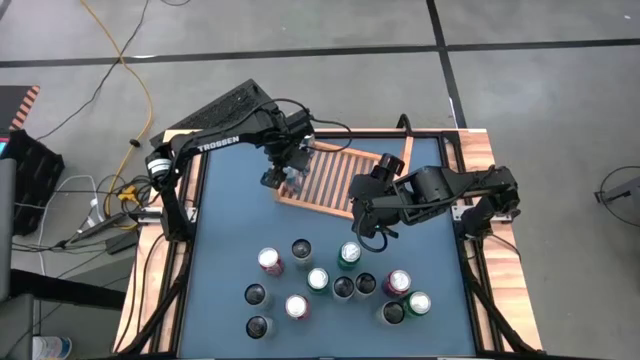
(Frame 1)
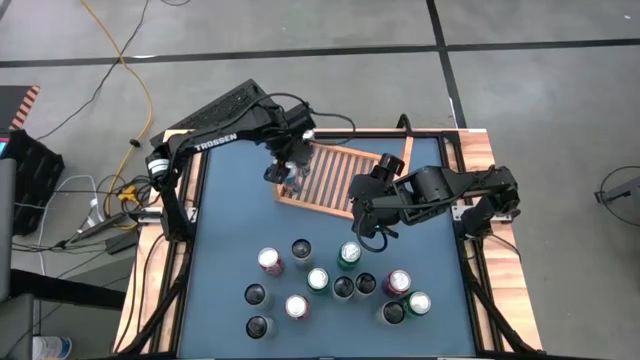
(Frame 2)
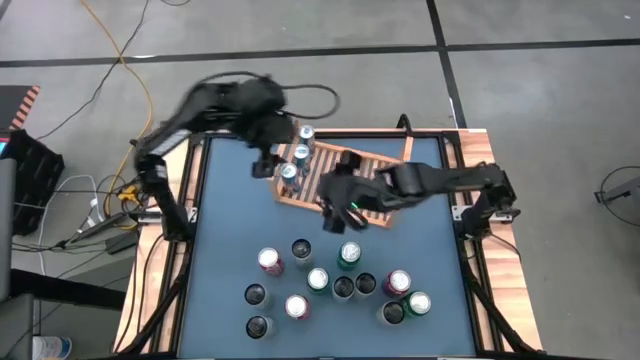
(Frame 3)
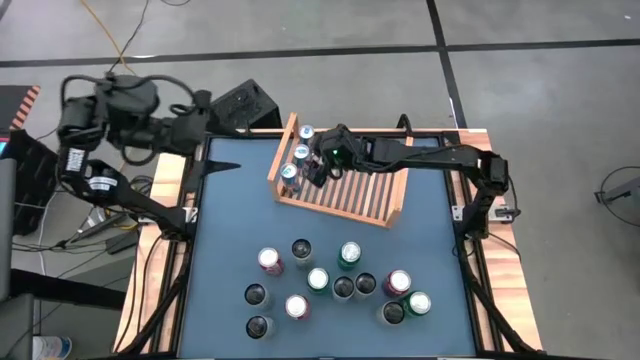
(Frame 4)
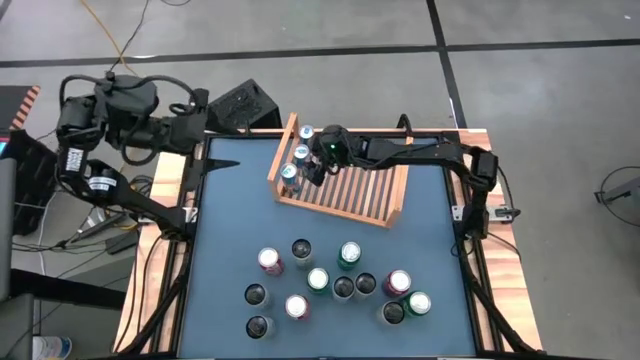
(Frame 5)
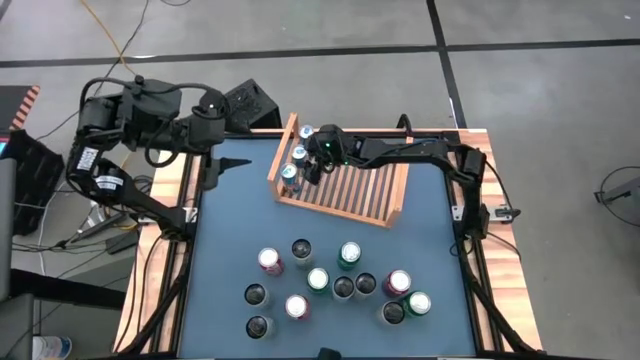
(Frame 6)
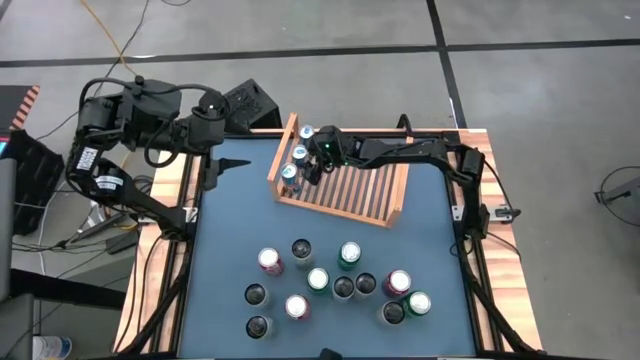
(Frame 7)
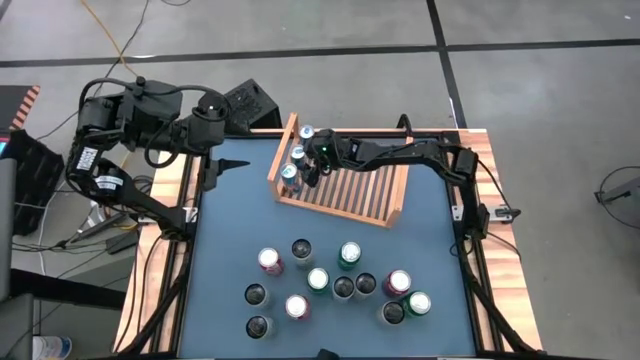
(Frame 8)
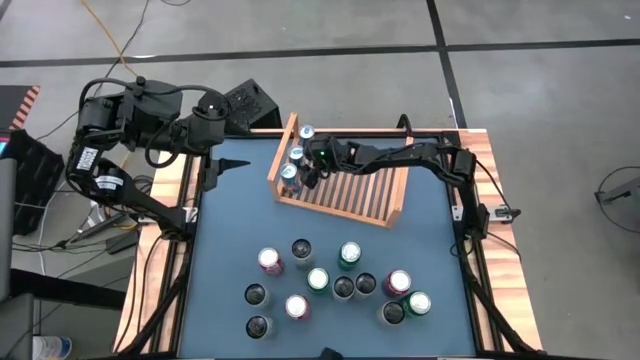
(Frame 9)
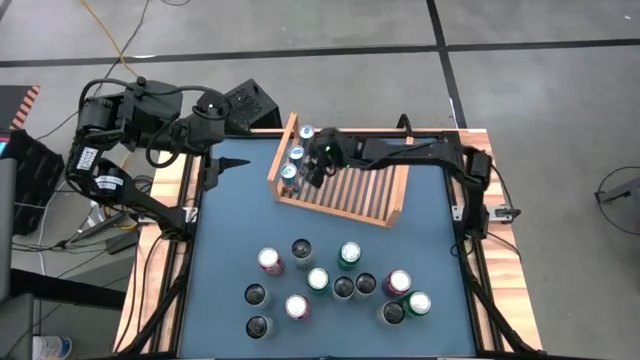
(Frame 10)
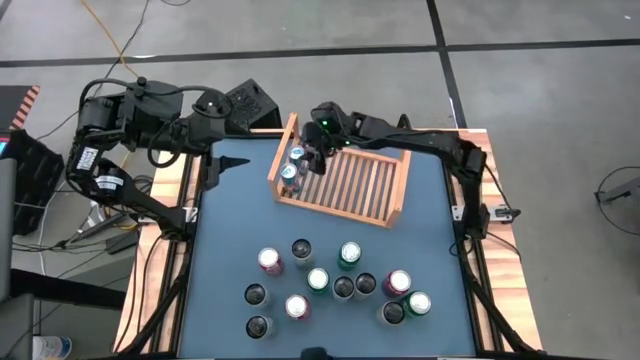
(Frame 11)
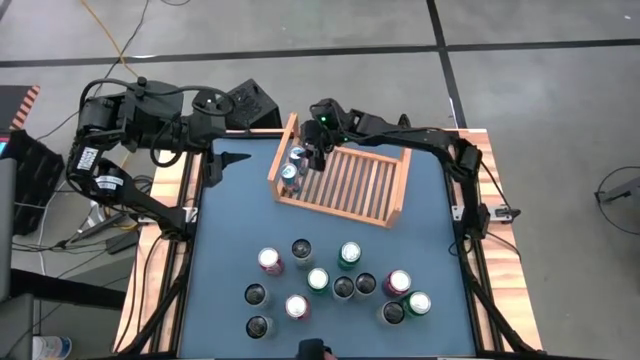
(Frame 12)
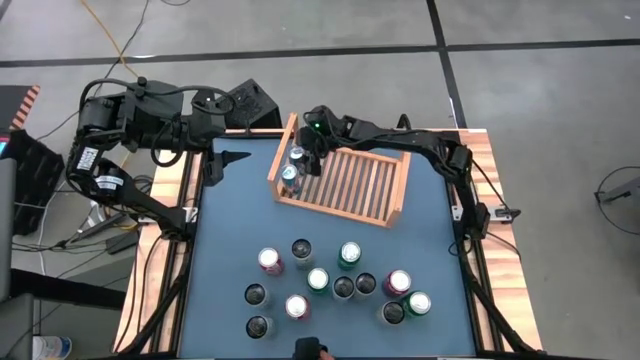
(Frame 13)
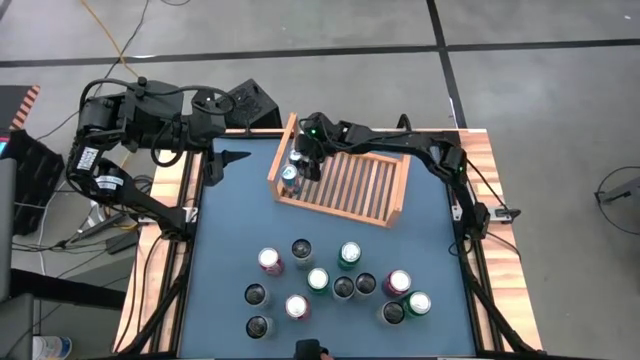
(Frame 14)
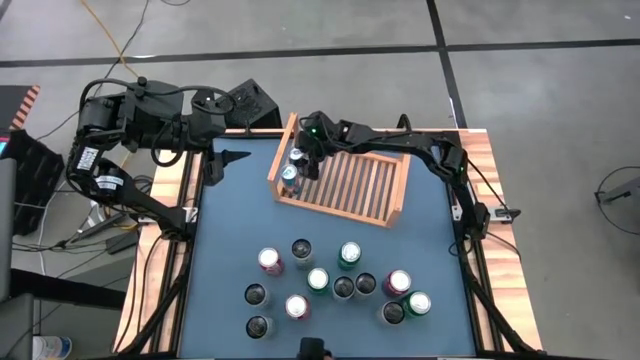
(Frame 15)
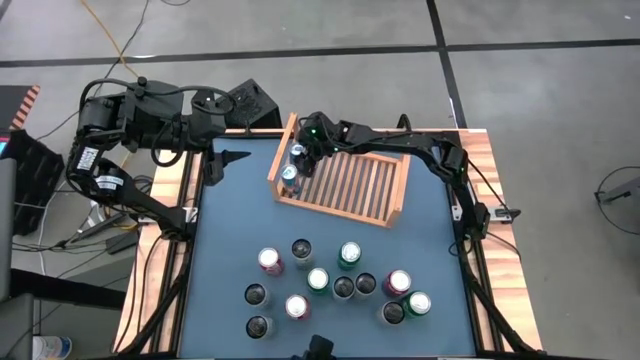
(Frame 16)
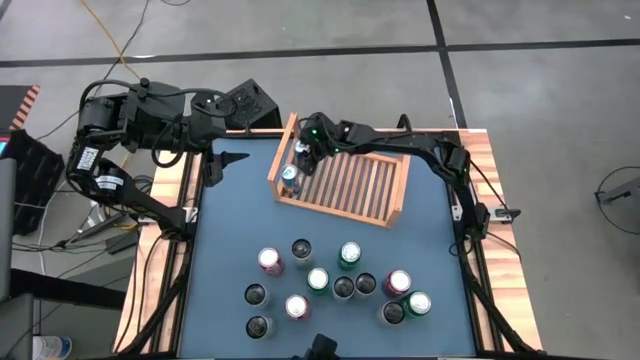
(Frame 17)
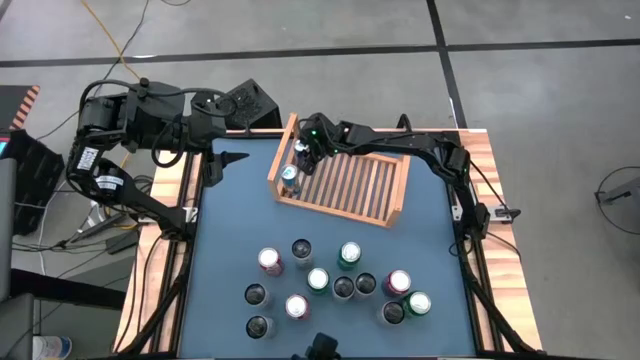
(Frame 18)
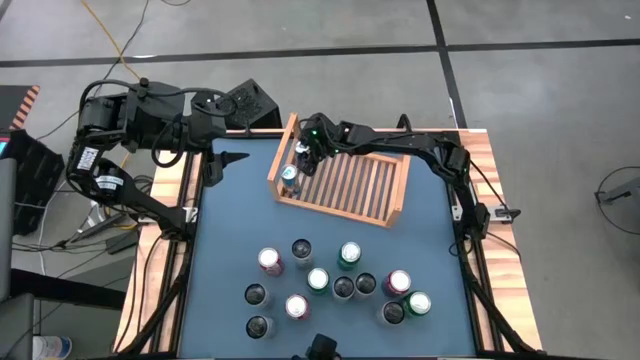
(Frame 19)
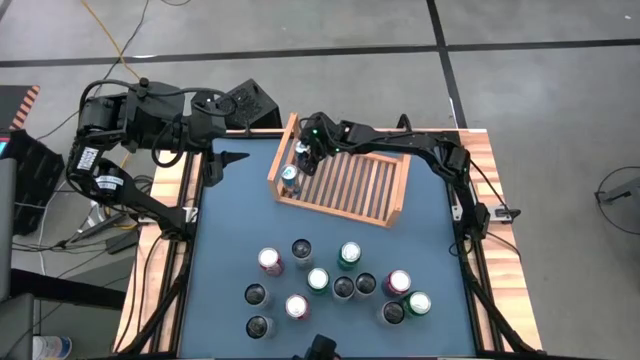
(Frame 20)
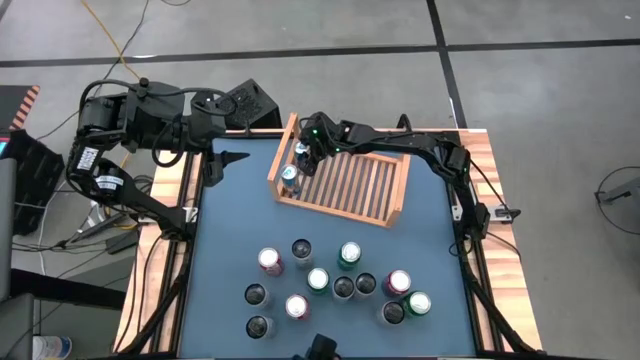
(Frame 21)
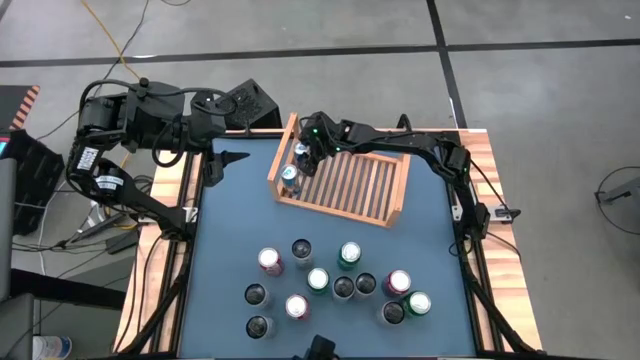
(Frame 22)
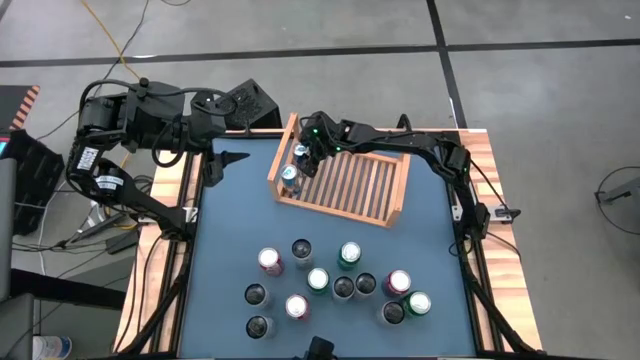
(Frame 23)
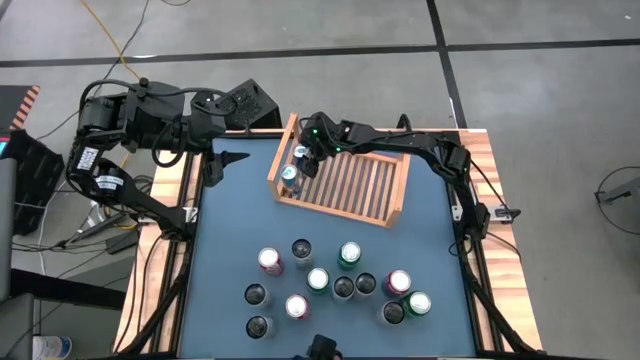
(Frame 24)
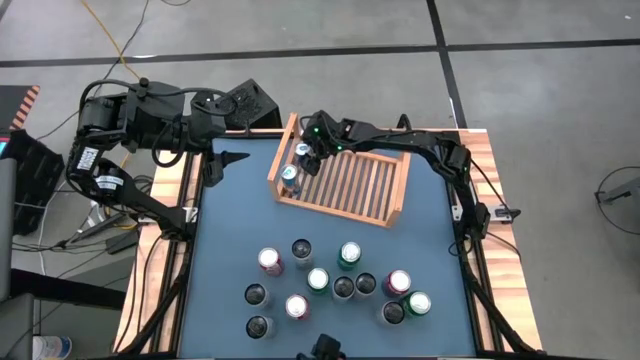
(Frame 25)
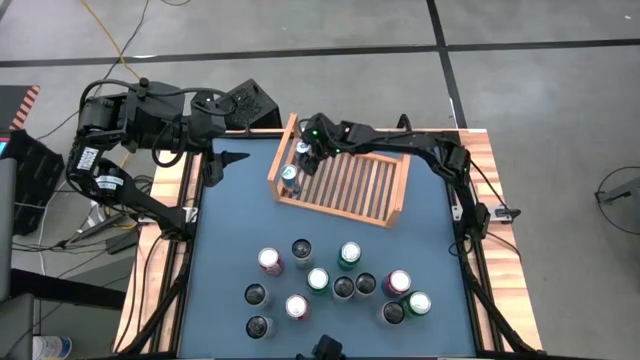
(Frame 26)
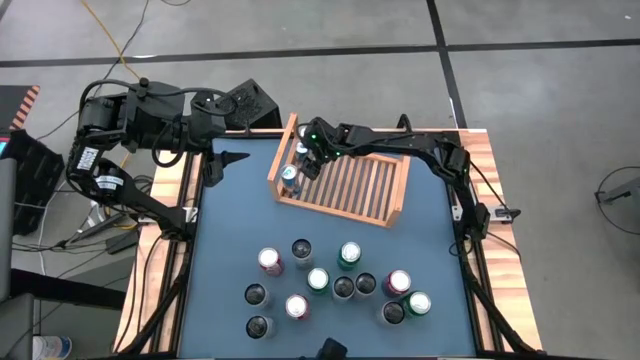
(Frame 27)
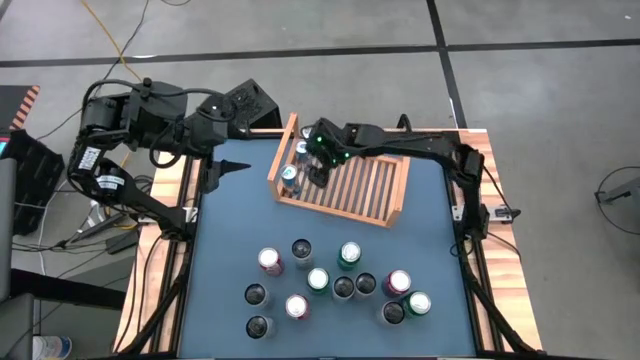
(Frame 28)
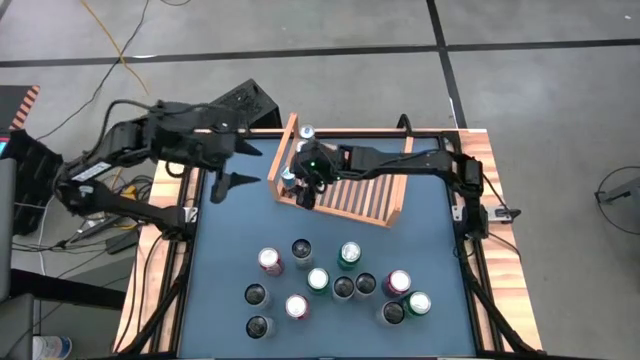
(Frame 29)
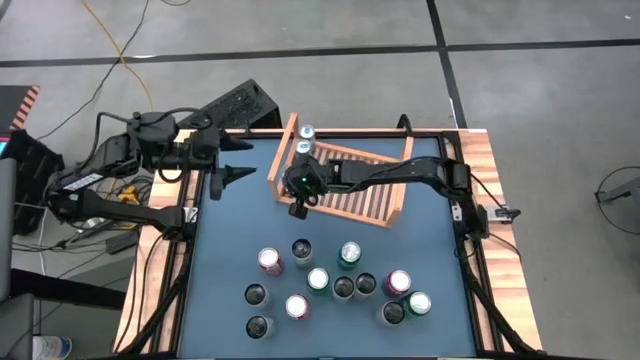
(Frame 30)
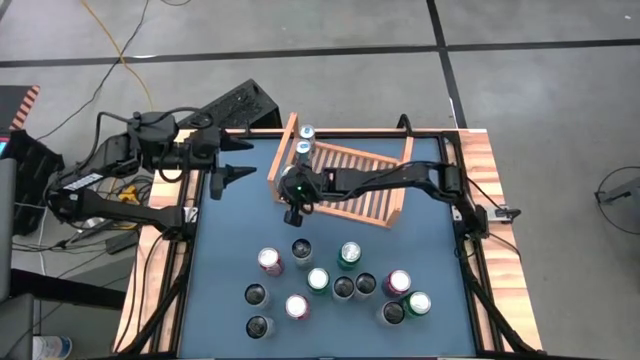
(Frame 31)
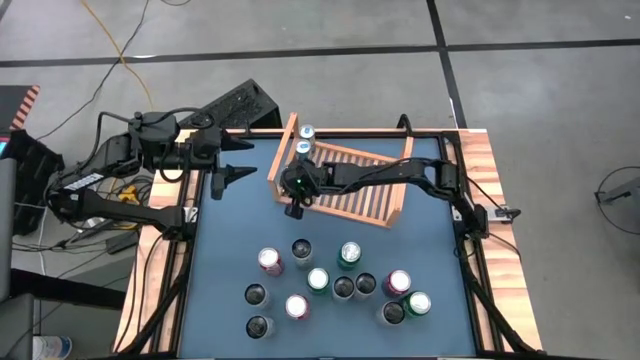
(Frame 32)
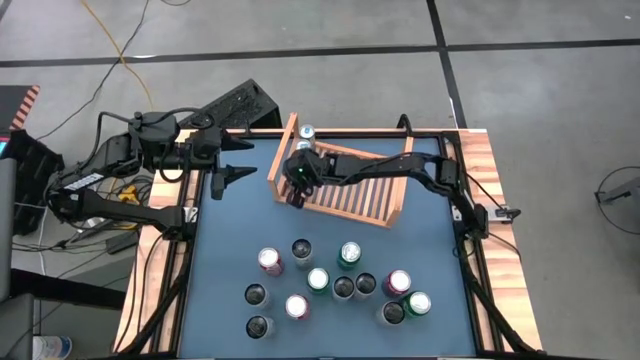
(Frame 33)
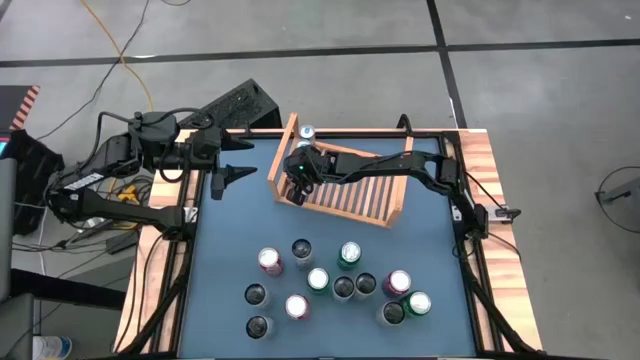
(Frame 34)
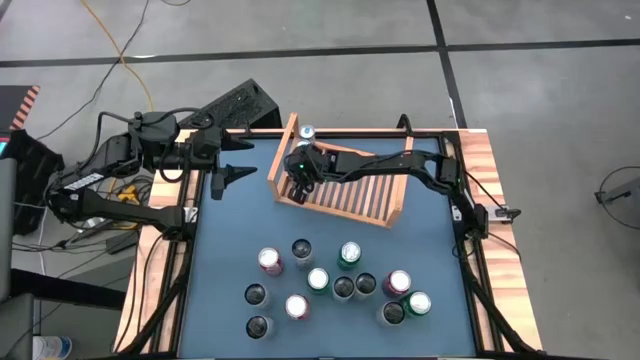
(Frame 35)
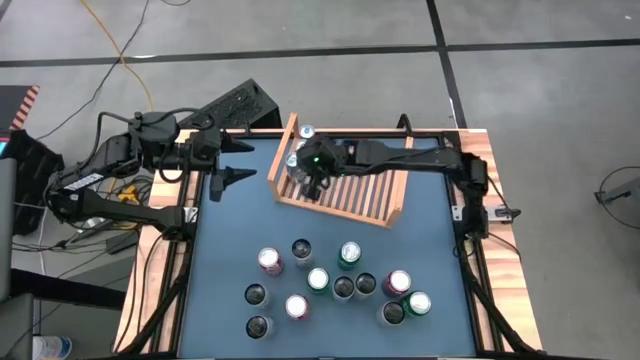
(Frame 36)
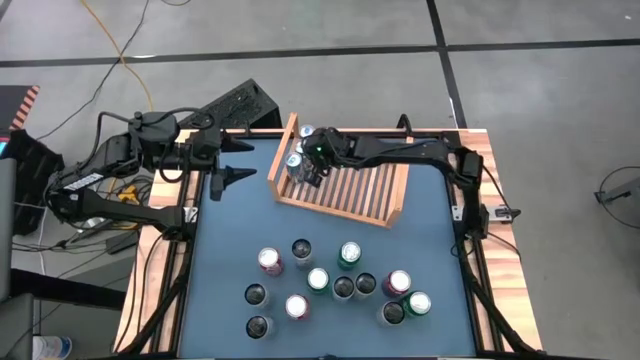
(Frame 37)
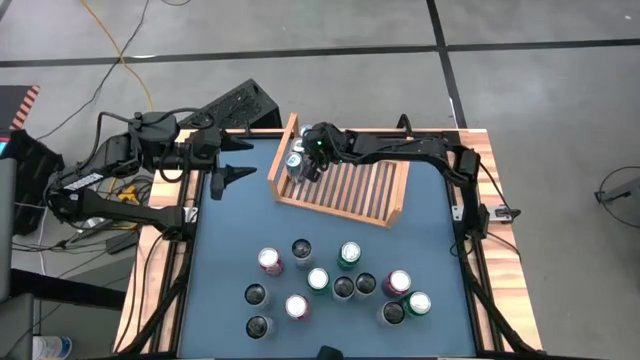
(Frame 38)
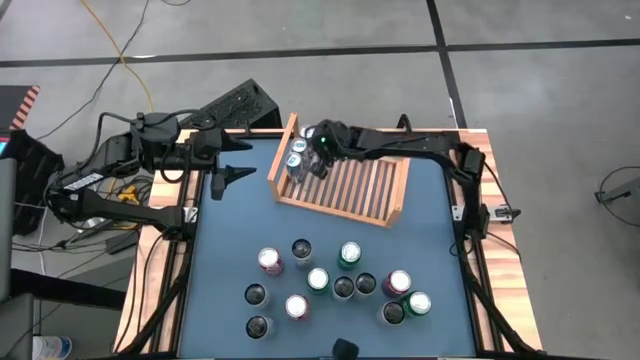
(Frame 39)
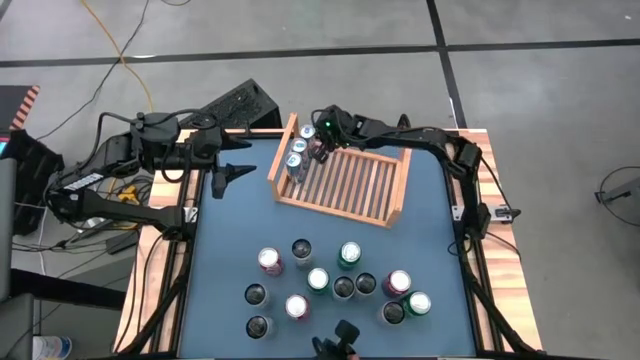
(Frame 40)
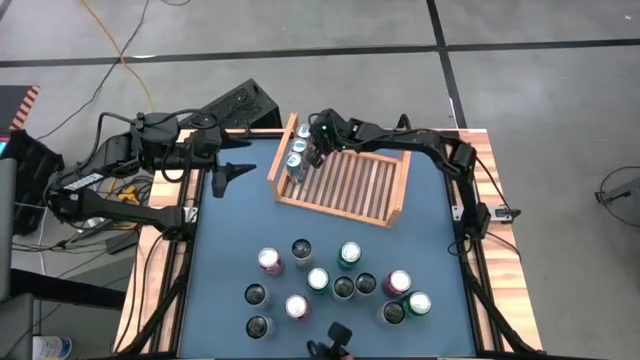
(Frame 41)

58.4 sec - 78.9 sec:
Task: Place canned beverage on shelf
Adjust the blue soda cans on the shelf

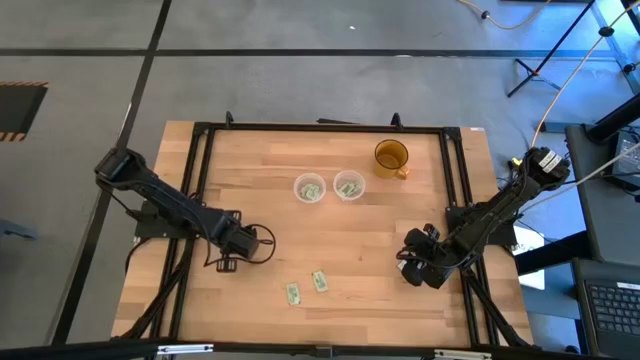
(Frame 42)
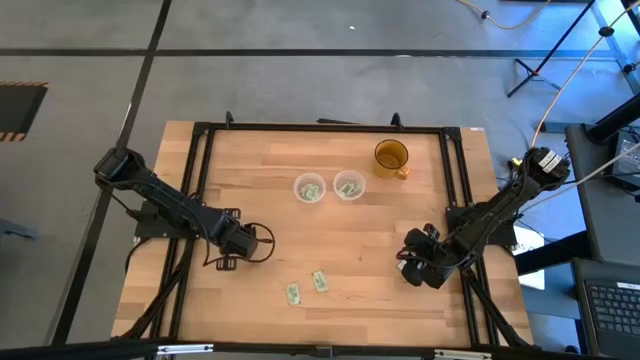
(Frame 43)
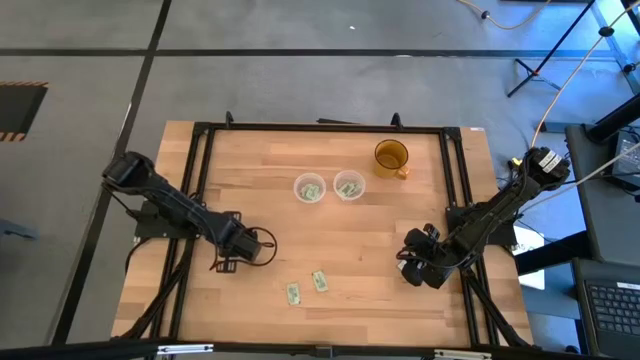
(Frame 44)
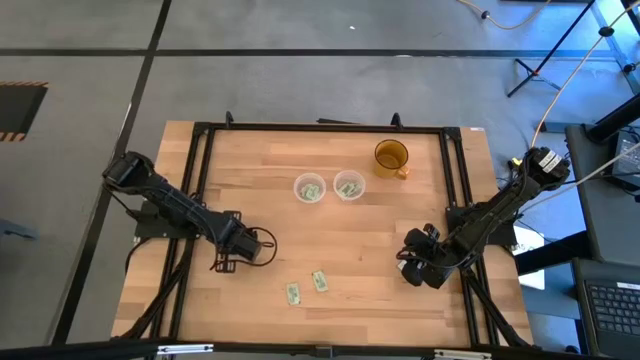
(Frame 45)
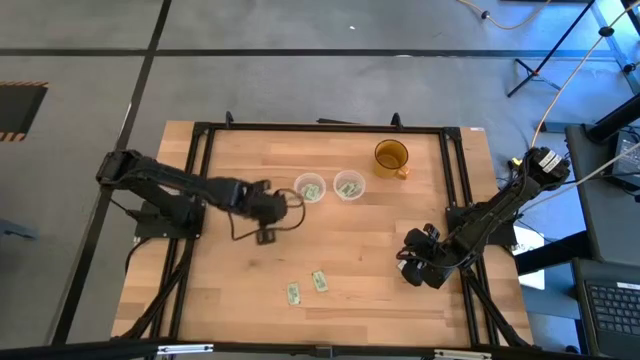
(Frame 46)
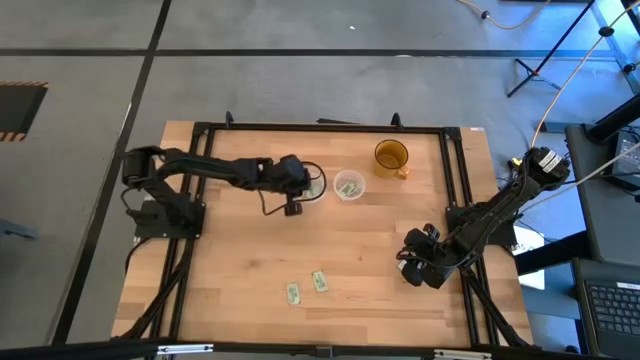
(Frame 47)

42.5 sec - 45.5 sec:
Task: Pick and place Stevia / Truvia into bins
Put the stevia packet into the left transparent container
